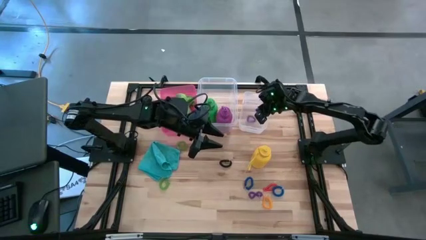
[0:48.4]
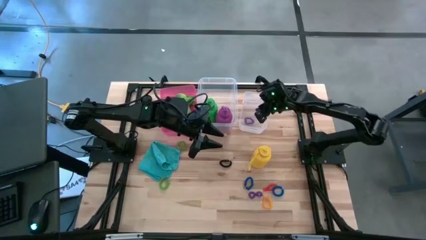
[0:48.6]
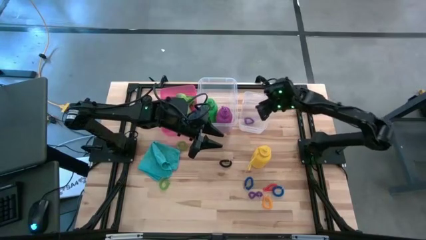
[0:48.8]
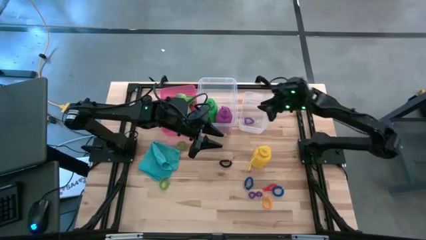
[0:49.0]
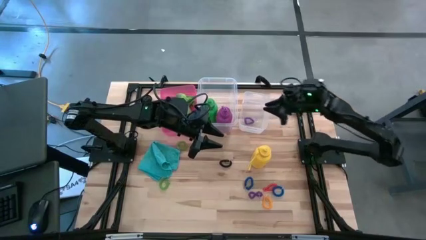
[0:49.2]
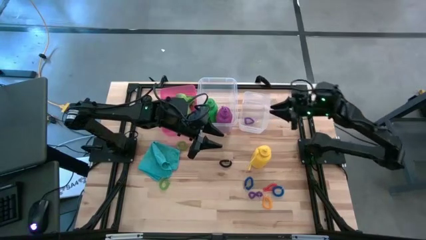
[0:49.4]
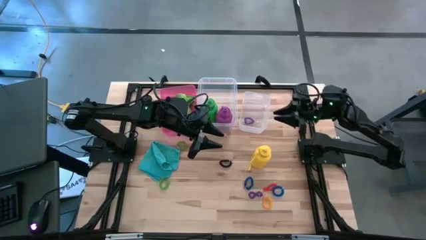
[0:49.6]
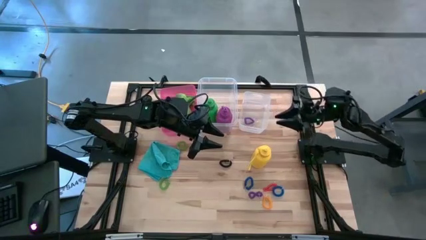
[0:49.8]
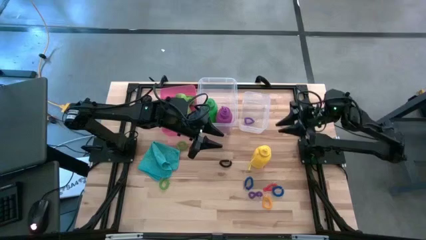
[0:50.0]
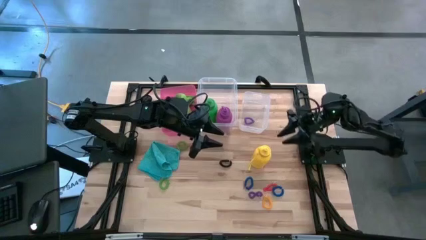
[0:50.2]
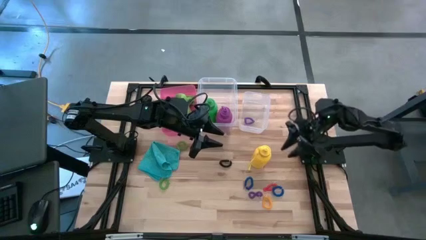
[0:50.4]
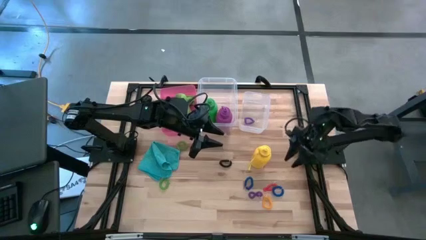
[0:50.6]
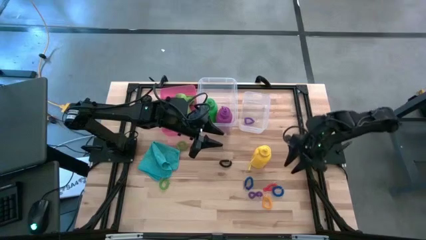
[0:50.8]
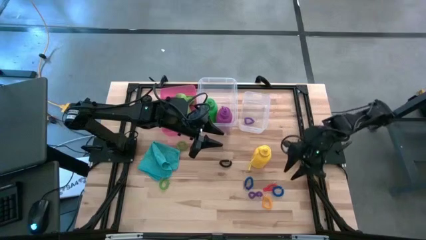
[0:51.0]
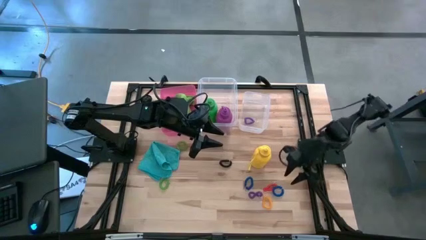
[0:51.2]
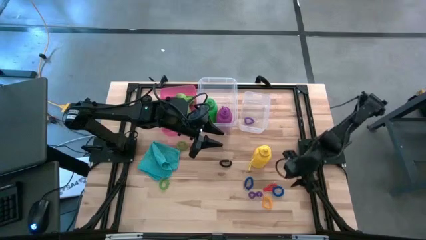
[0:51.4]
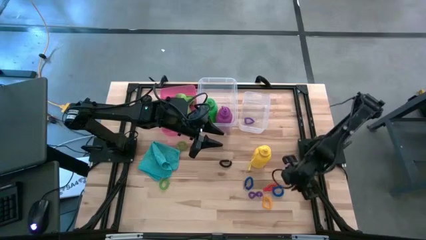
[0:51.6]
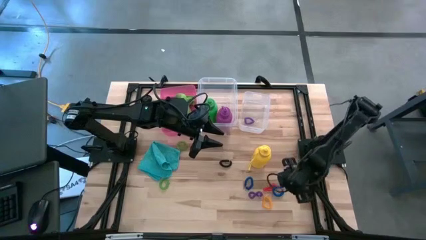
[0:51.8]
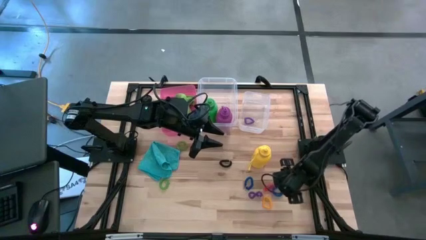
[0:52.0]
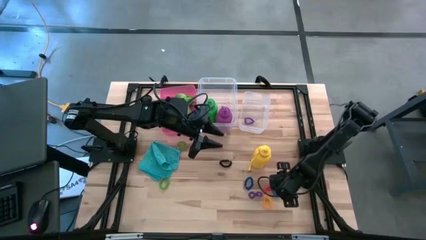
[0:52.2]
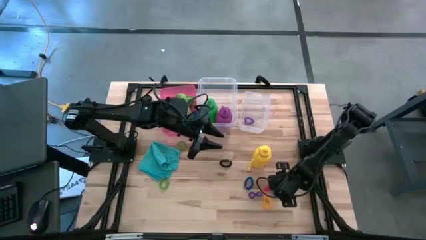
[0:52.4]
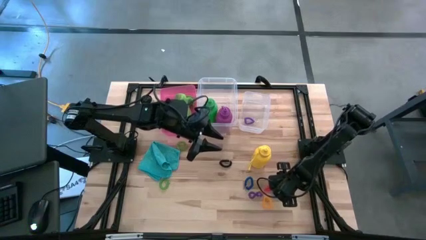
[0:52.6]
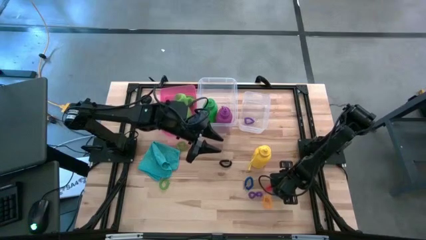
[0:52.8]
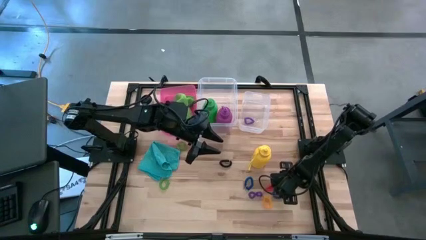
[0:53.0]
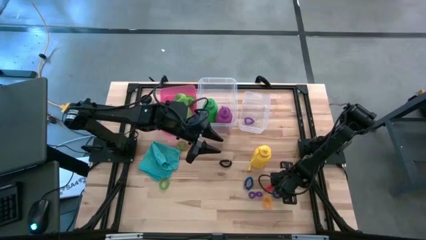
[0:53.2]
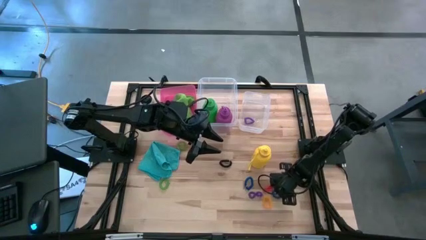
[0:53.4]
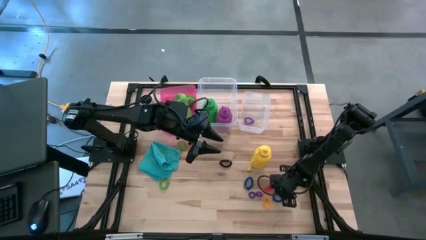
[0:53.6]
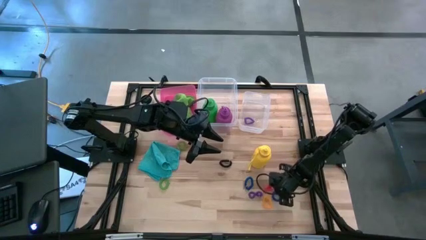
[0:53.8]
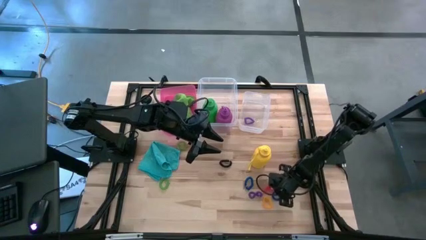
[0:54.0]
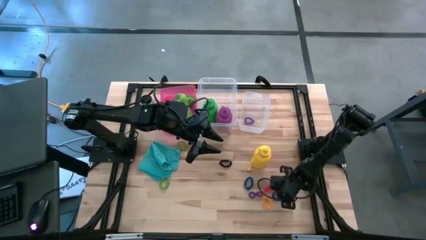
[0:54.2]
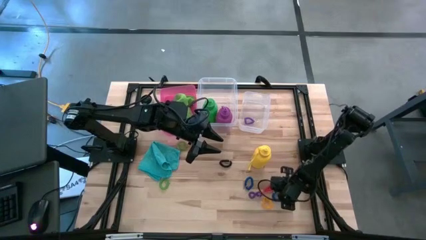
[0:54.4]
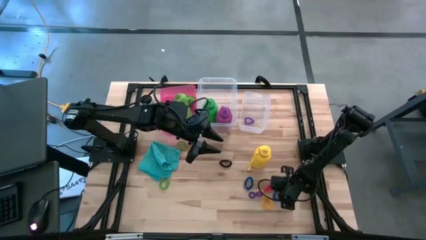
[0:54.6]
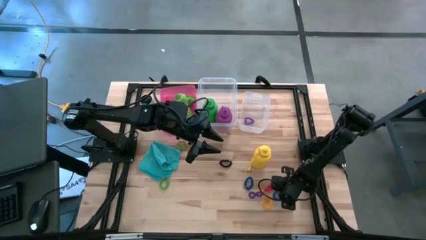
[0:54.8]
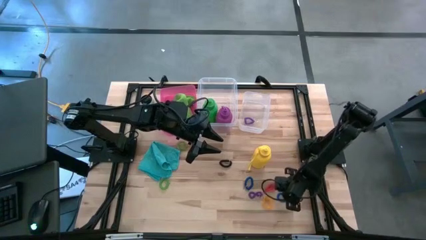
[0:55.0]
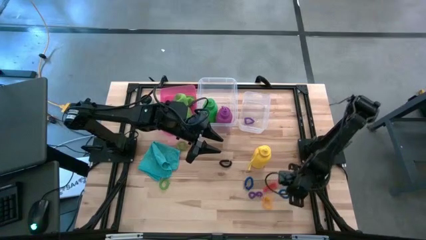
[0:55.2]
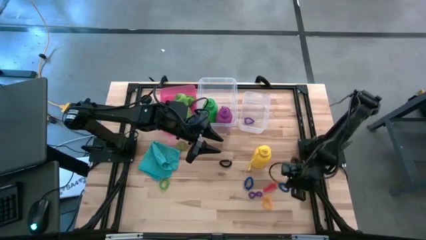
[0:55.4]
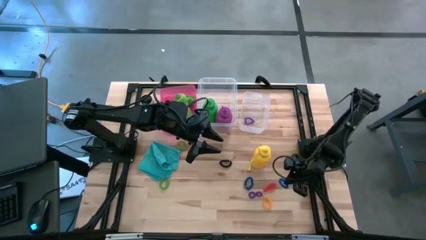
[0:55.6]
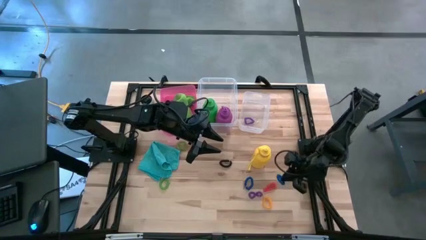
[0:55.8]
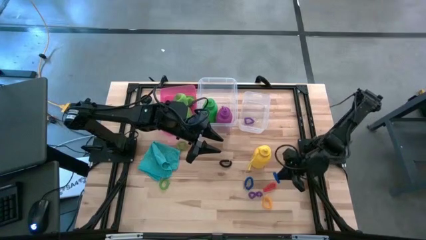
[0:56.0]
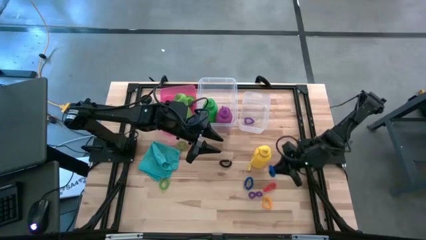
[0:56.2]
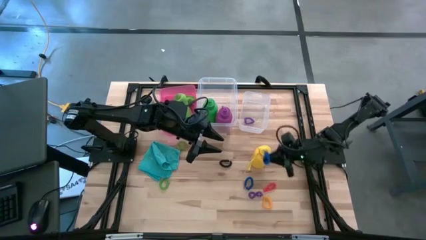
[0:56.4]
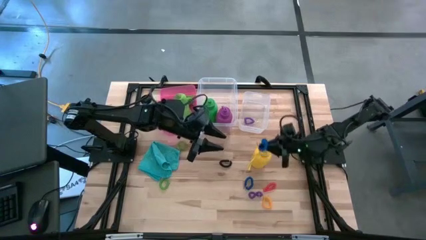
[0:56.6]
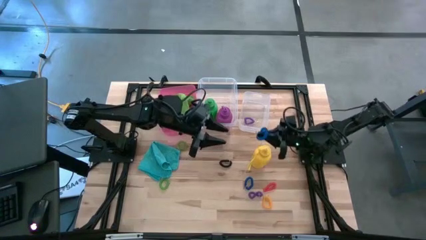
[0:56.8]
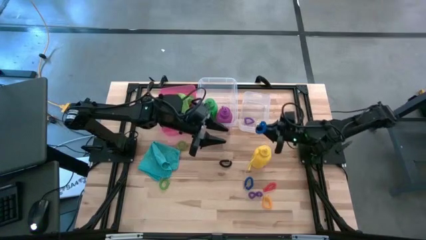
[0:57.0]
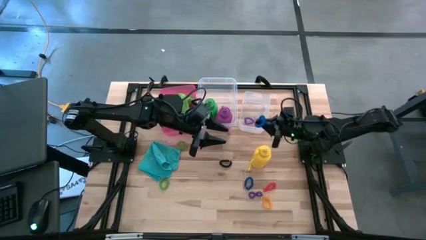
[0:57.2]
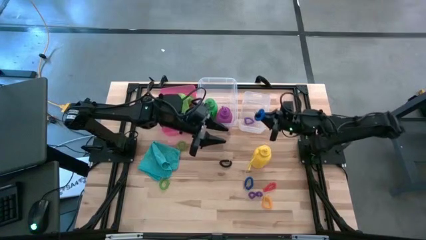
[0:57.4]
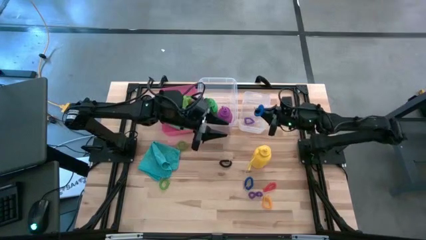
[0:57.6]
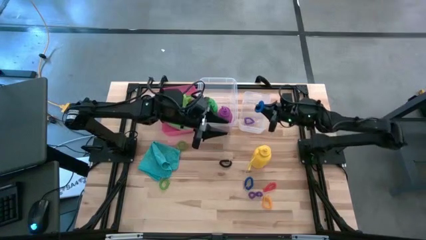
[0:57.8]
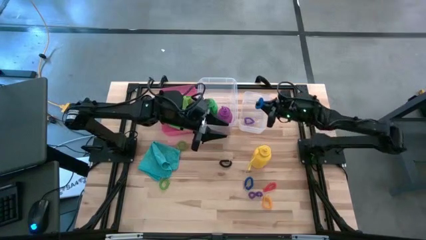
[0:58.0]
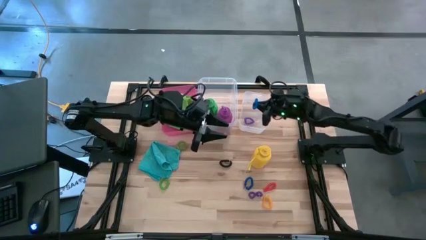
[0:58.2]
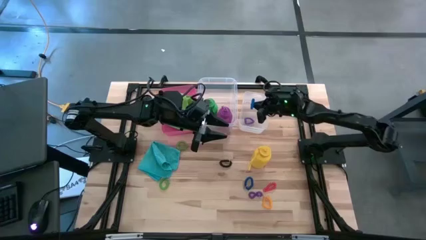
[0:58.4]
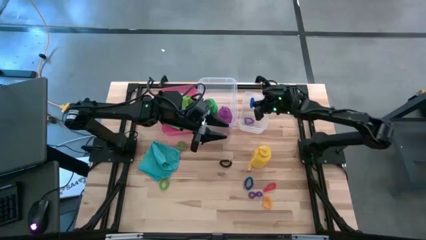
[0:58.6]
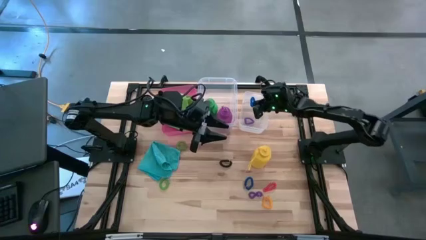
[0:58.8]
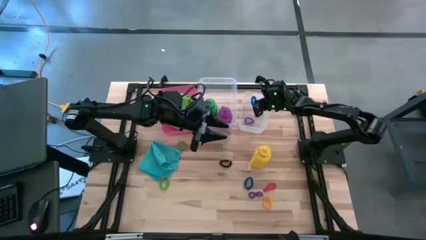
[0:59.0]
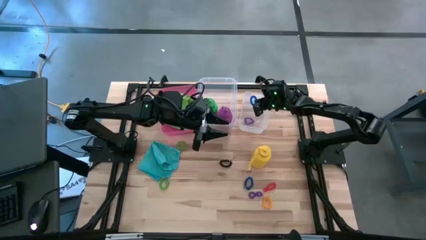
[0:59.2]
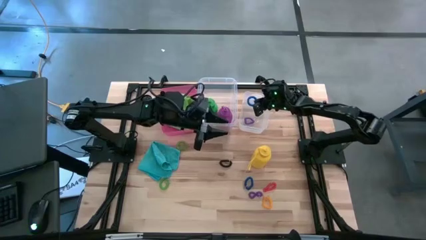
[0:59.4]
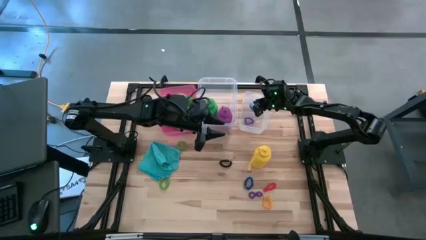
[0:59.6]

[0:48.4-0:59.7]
Task: Pick & Place Sports Items
Put the right blue spring keychain into the right transparent bin
